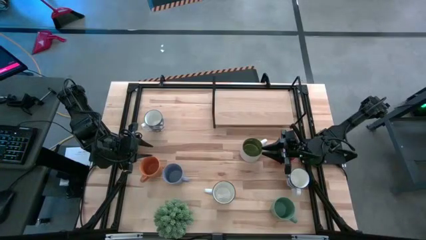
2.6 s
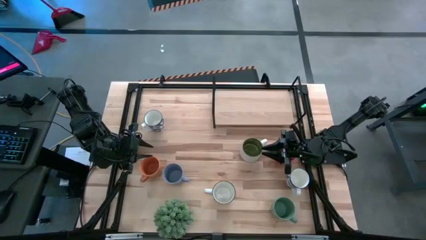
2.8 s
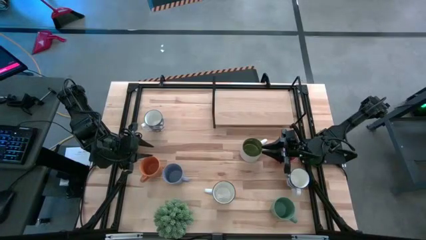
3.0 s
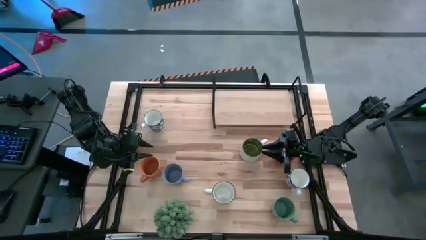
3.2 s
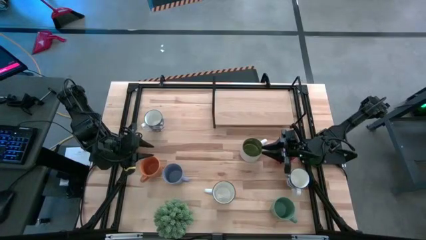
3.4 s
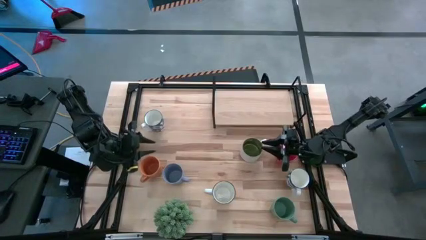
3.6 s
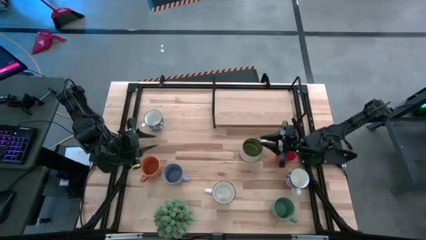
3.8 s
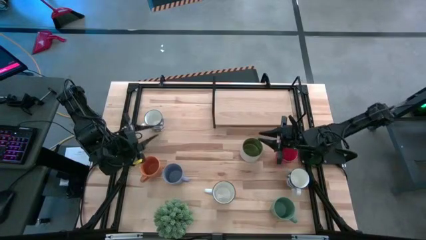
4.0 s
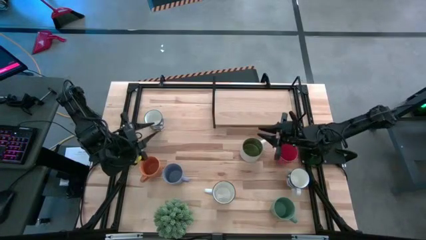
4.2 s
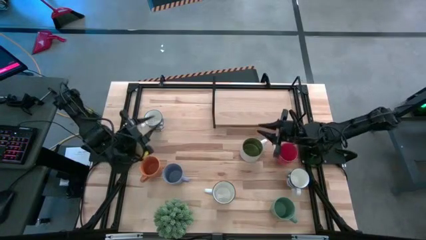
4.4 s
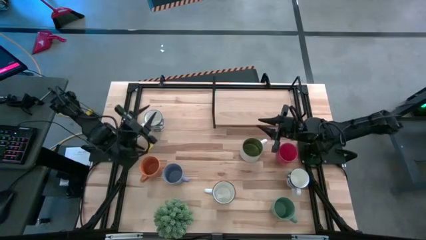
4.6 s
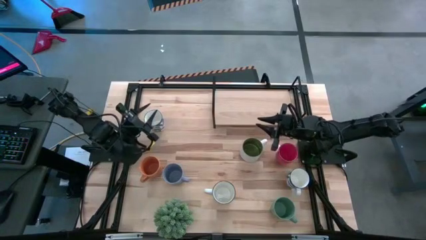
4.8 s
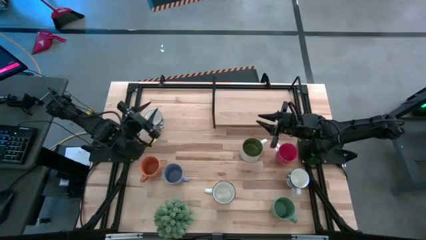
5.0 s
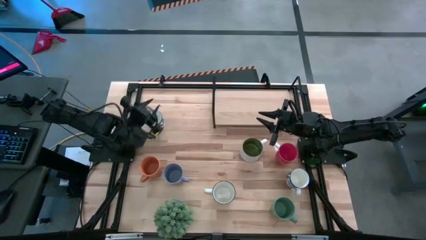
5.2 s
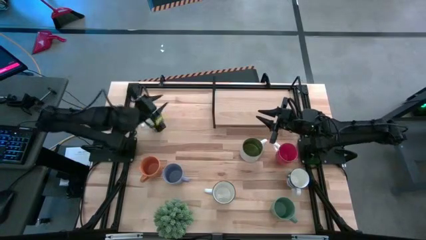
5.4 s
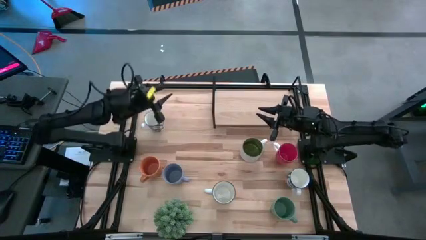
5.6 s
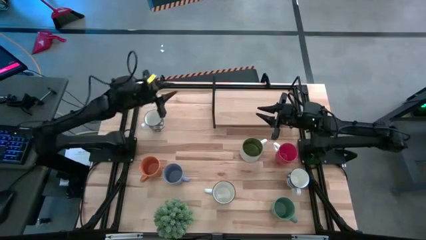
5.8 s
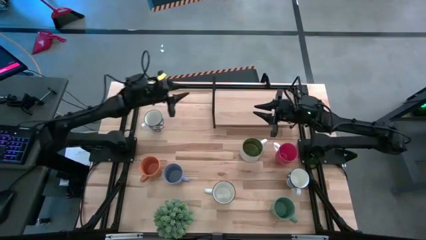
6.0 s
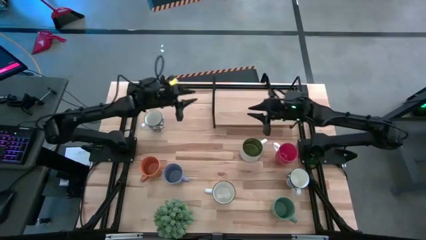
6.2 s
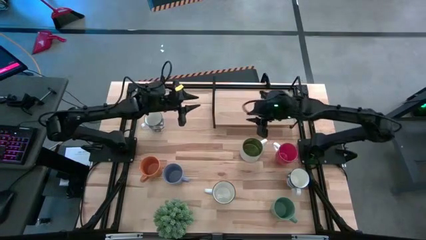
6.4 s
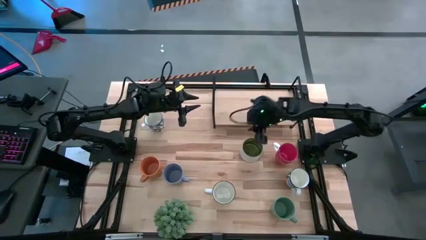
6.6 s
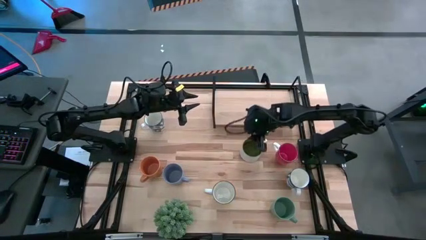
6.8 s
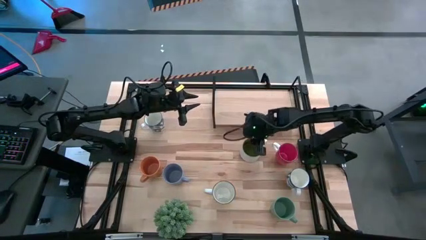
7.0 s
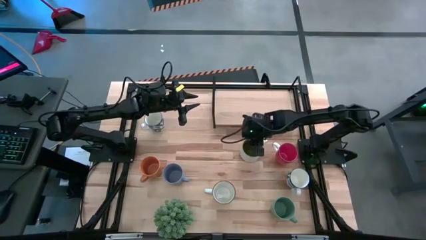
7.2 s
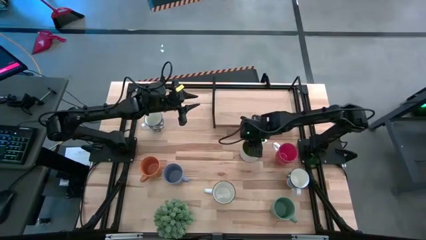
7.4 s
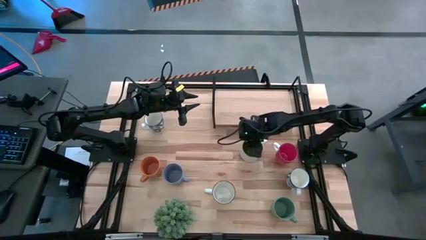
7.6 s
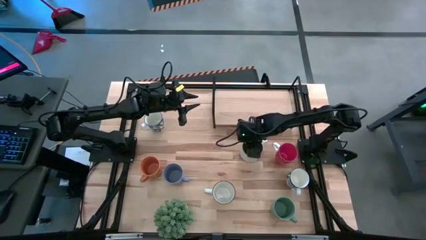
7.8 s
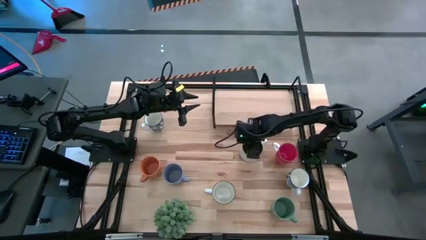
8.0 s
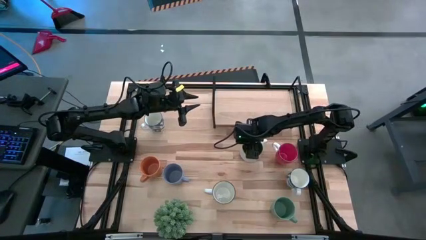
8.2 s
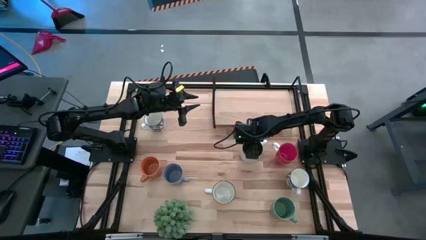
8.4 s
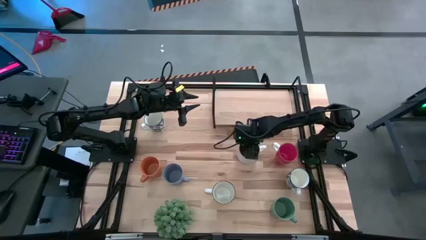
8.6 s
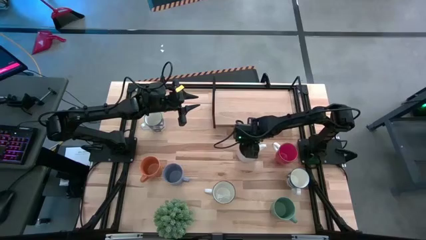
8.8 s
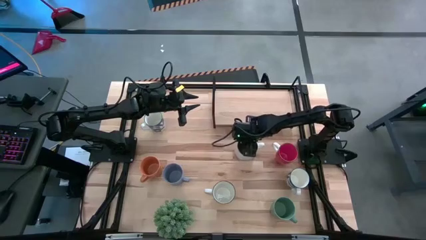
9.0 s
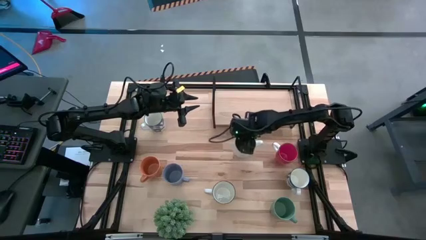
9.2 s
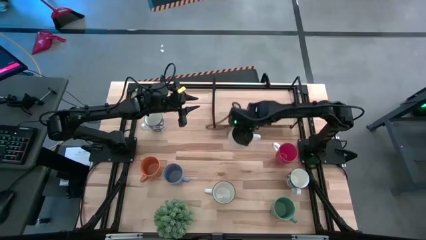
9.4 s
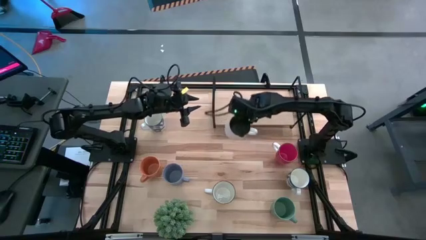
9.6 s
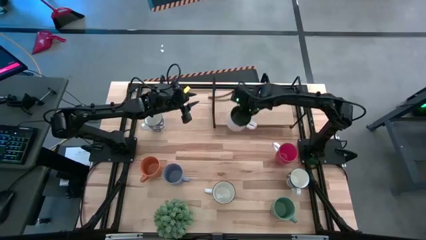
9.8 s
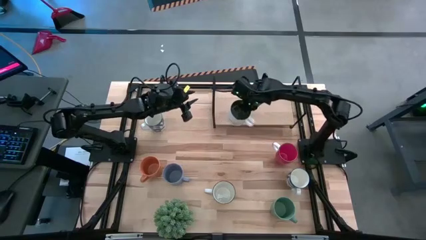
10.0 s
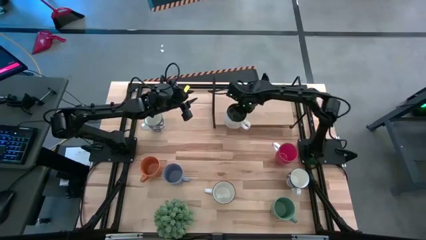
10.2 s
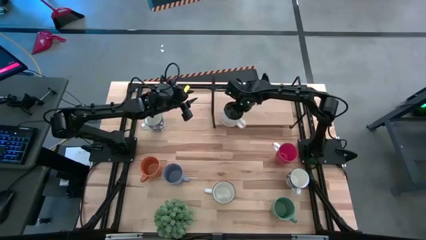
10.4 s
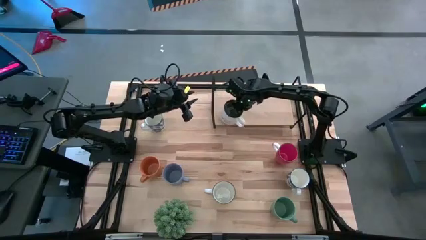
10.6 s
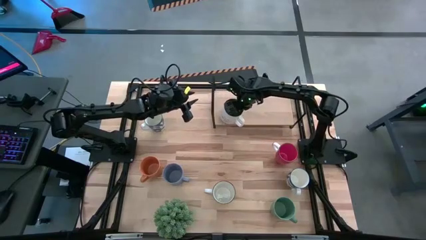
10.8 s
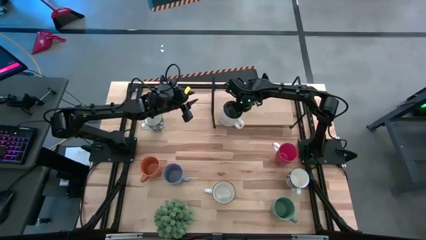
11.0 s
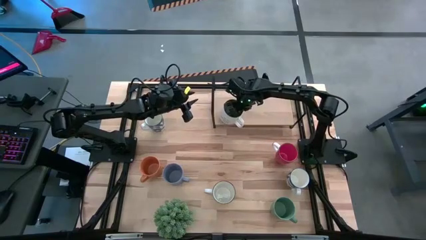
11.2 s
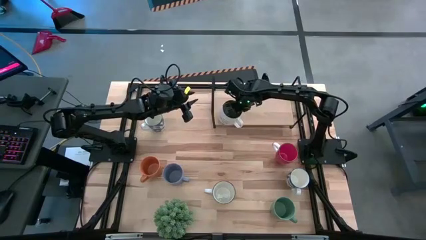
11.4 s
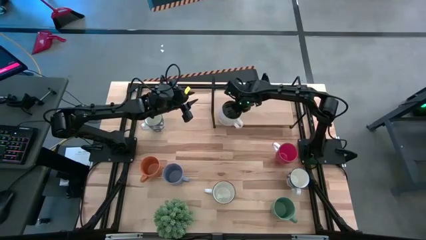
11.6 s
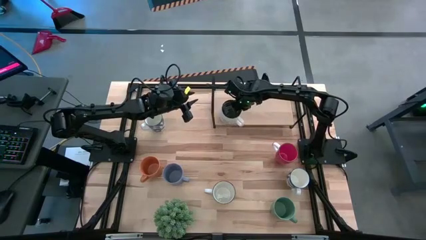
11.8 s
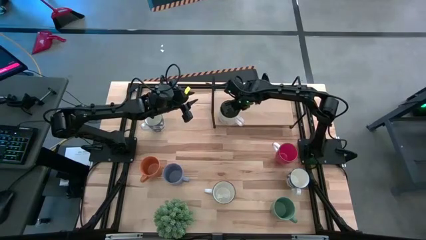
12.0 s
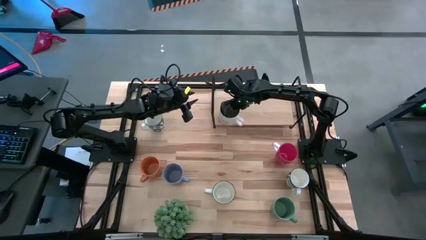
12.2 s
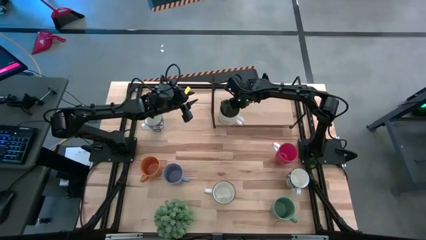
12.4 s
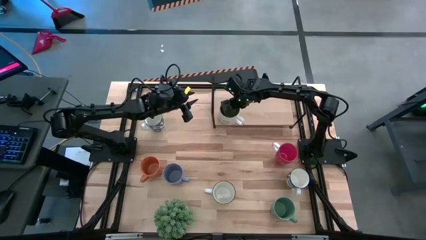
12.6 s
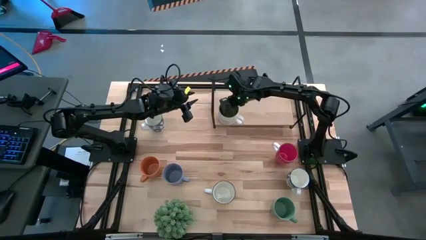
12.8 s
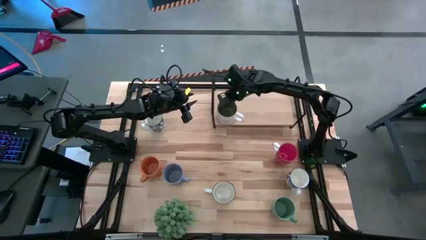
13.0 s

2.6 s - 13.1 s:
Task: Place coffee mugs
Put the white mug on the shelf
